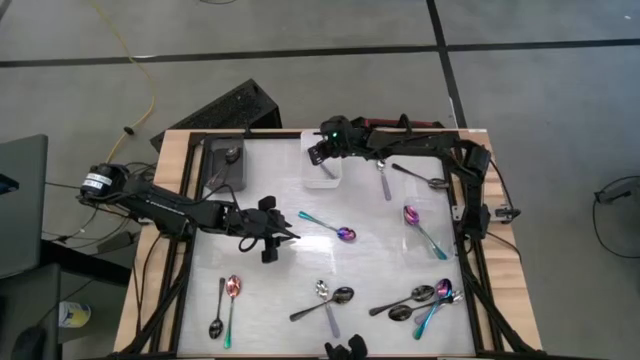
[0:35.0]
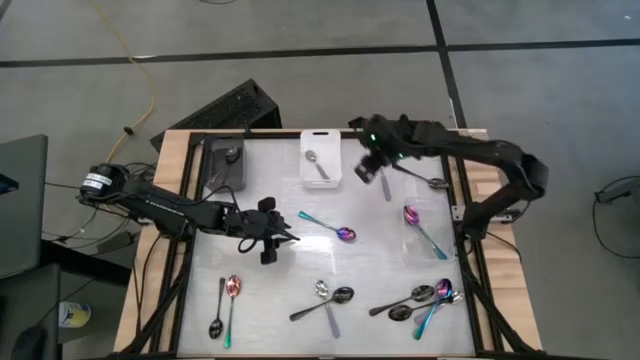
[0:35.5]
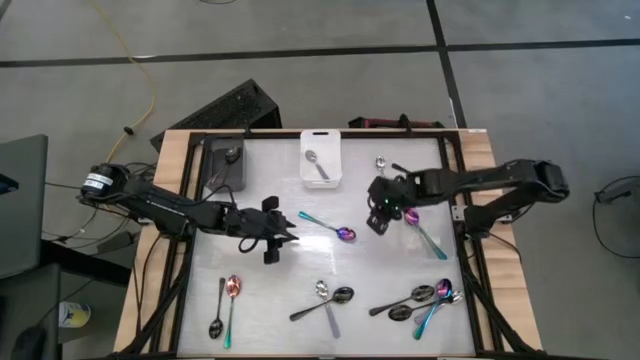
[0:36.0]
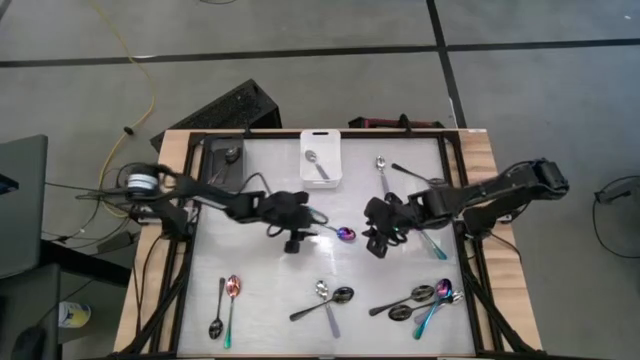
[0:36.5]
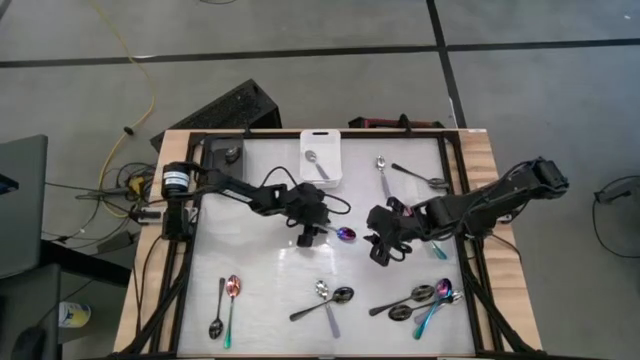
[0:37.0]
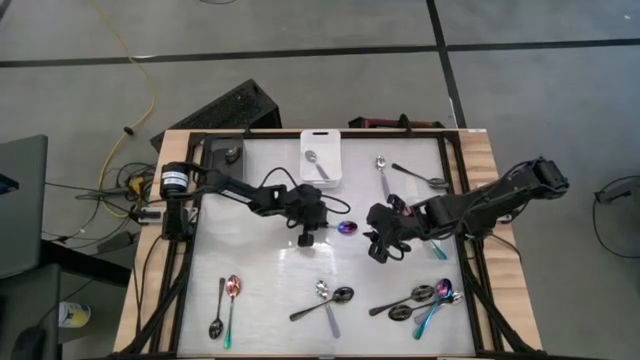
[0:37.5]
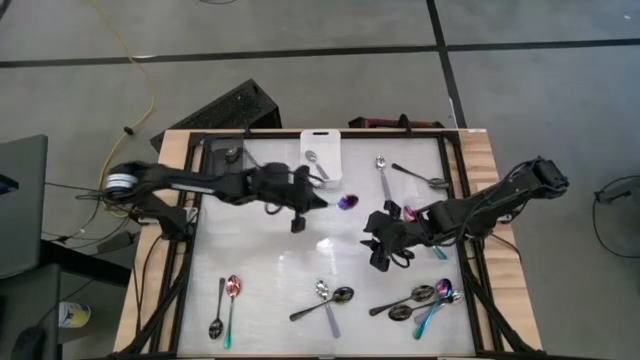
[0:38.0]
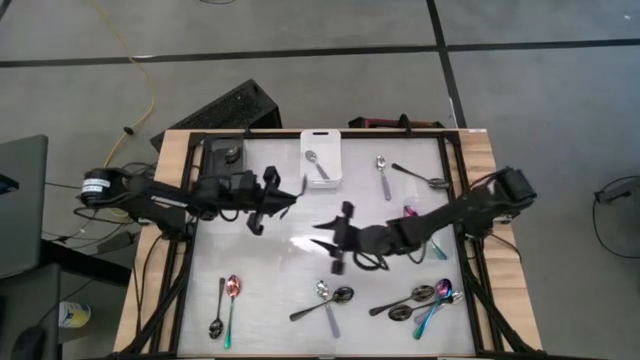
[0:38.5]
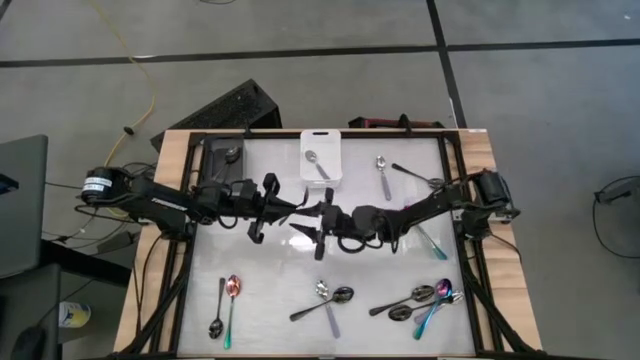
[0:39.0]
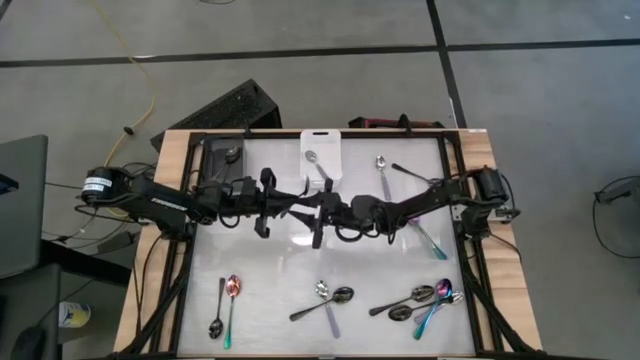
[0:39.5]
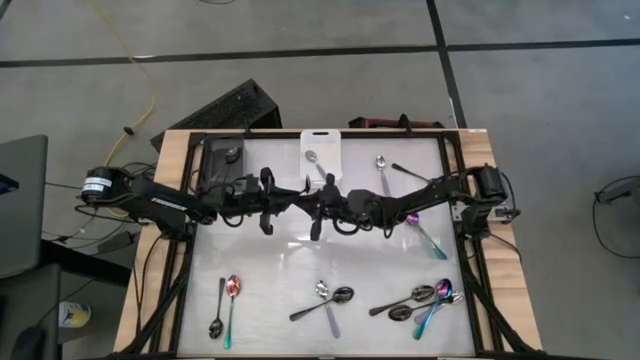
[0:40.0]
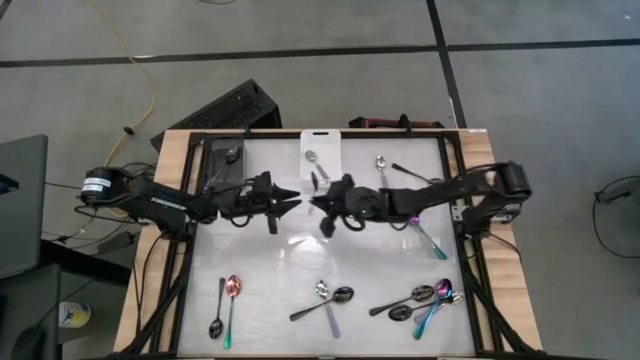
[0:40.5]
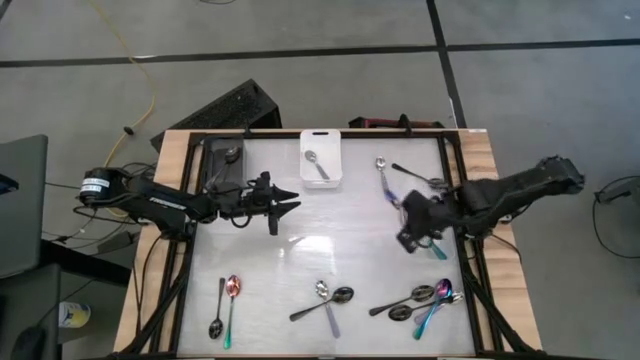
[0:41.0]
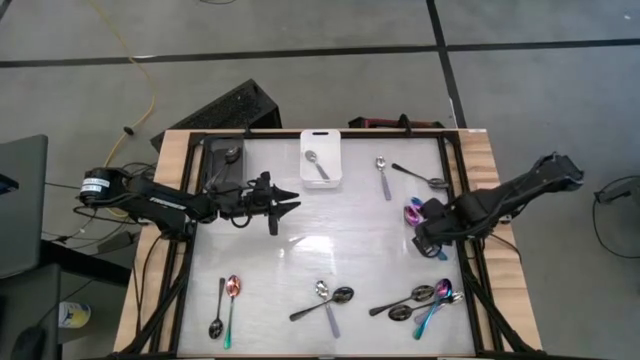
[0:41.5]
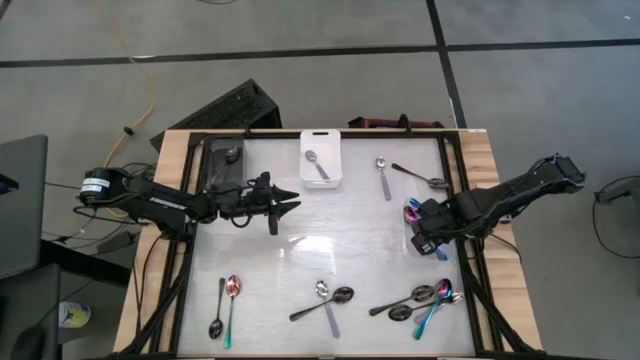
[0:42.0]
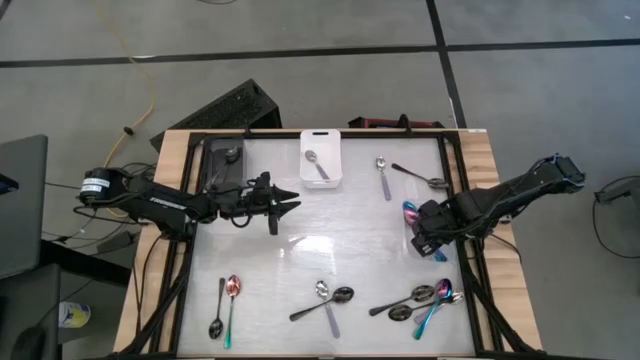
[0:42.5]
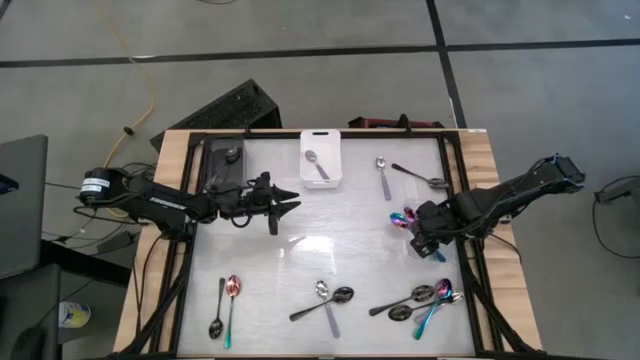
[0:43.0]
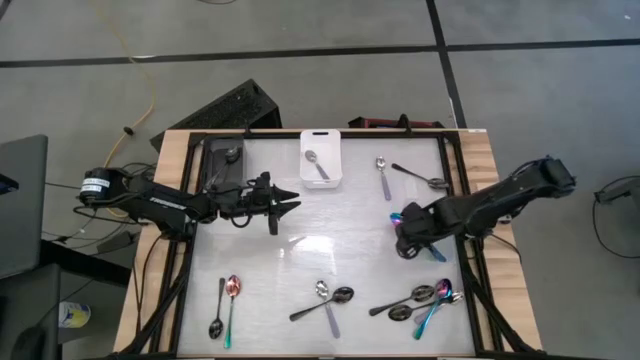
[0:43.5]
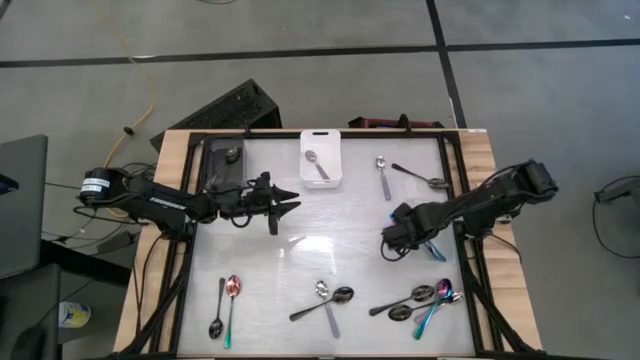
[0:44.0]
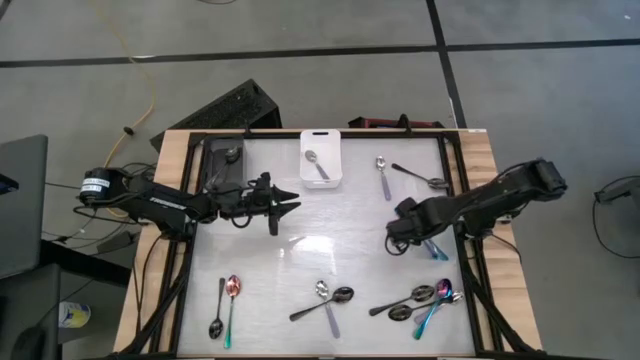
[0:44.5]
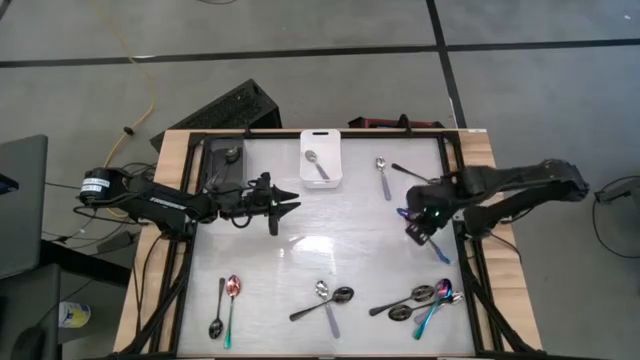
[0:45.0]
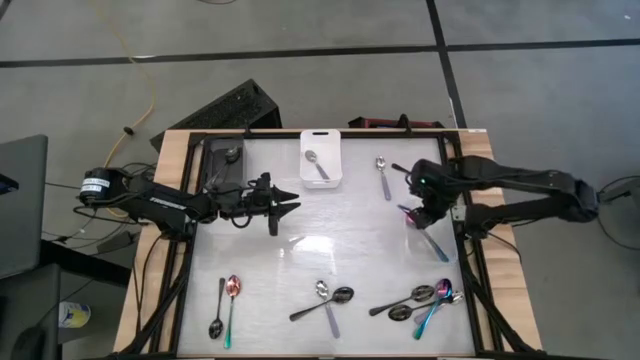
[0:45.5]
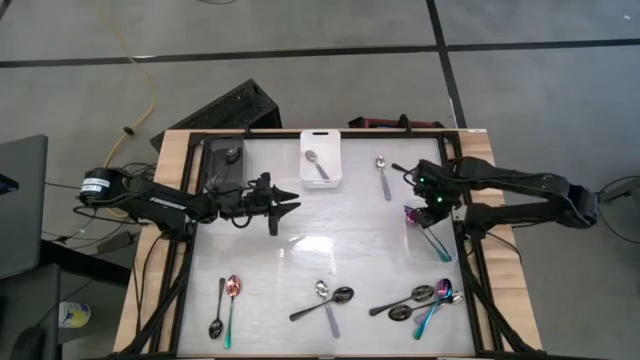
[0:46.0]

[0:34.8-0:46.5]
Task: Sort silverware by color (type)
Put the blue spoon into the transparent bin

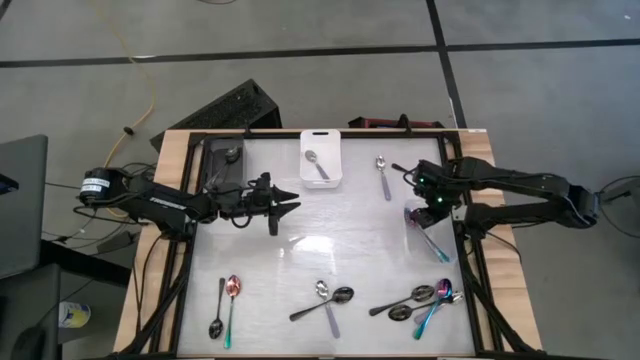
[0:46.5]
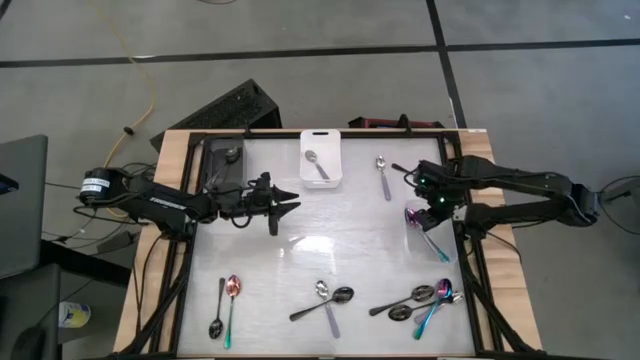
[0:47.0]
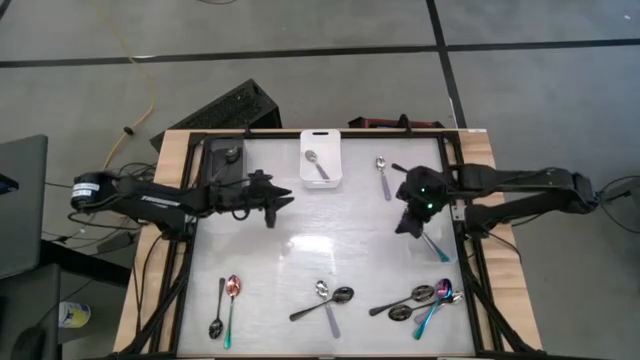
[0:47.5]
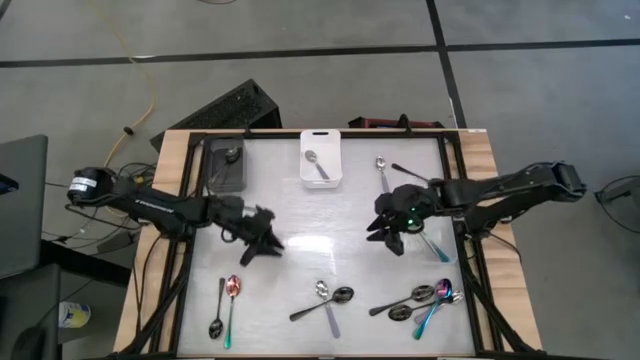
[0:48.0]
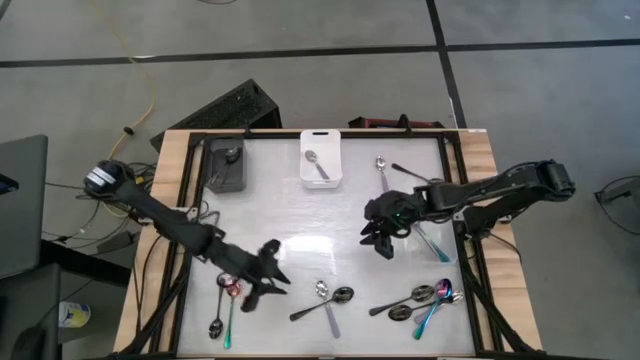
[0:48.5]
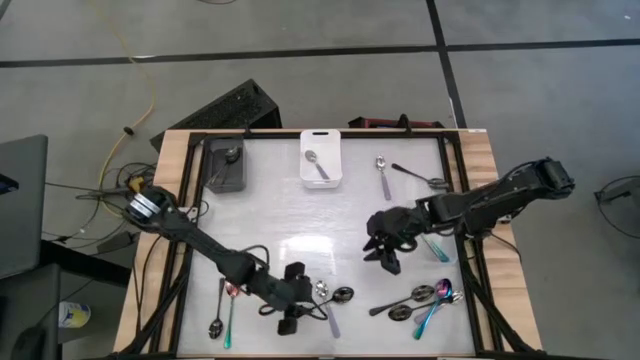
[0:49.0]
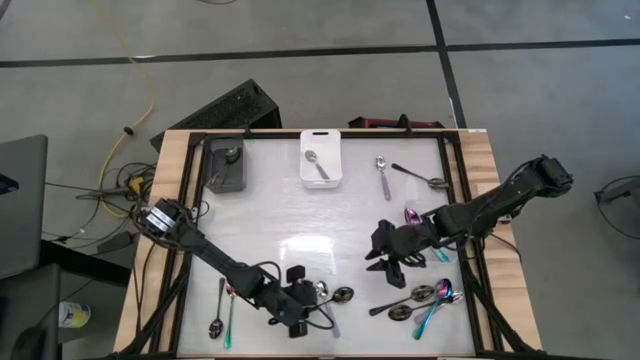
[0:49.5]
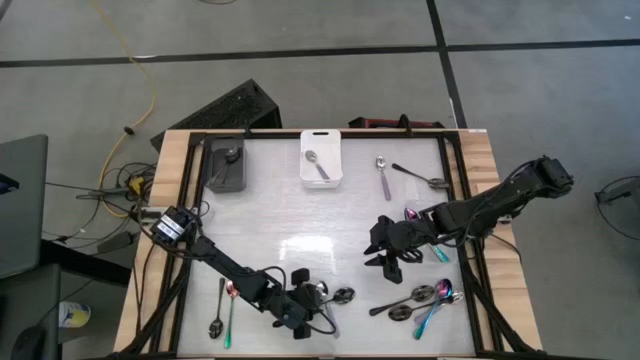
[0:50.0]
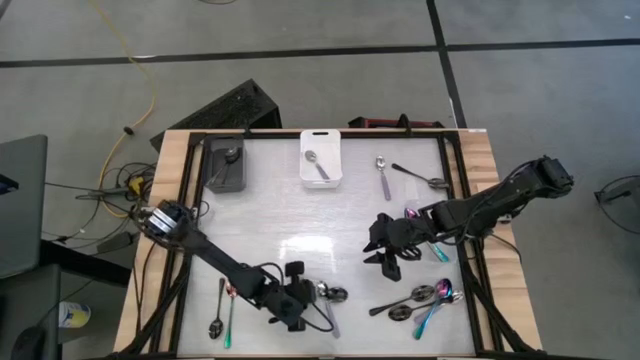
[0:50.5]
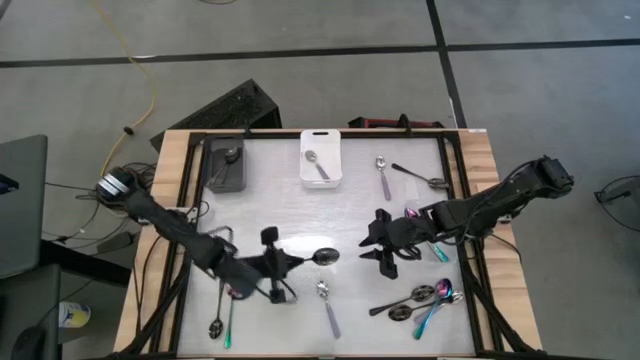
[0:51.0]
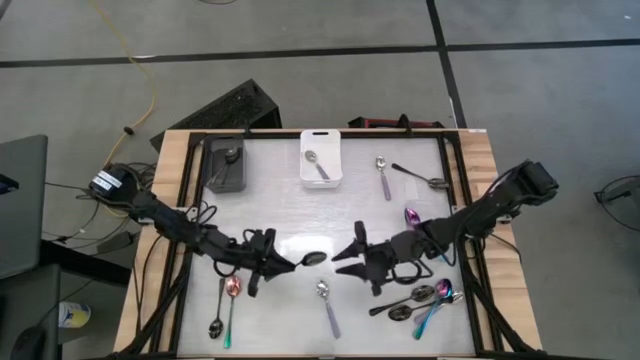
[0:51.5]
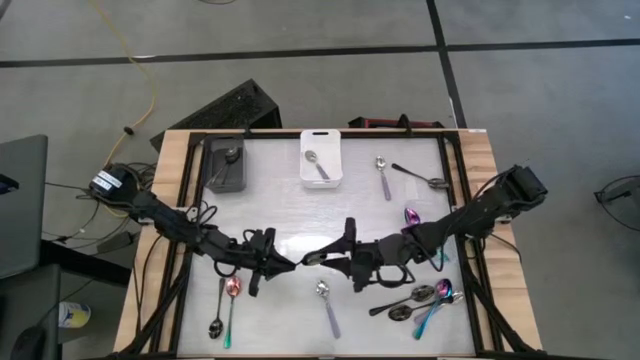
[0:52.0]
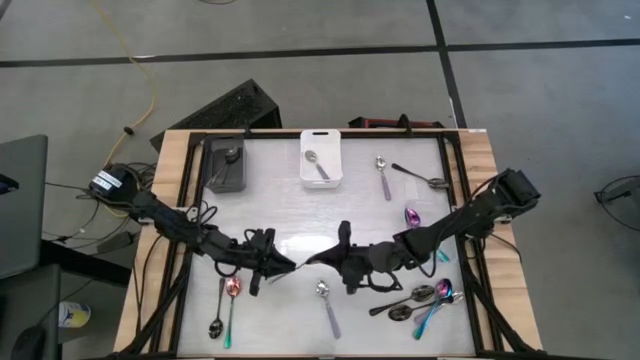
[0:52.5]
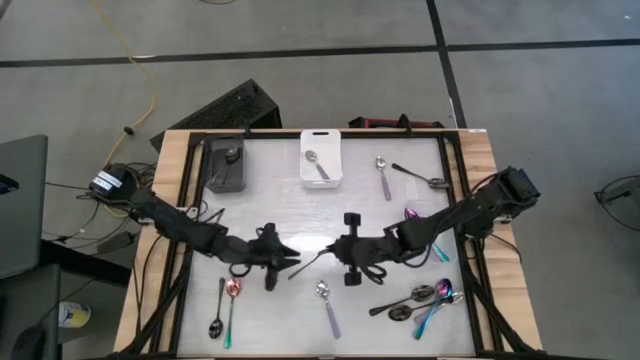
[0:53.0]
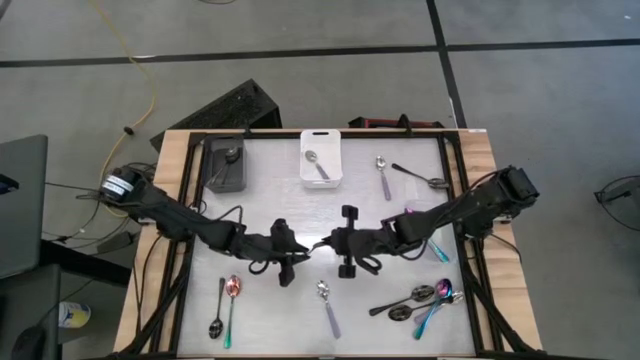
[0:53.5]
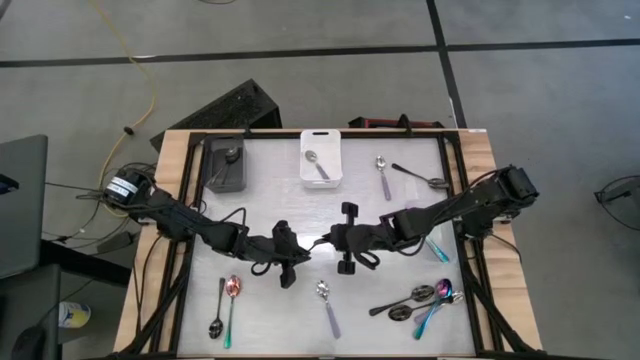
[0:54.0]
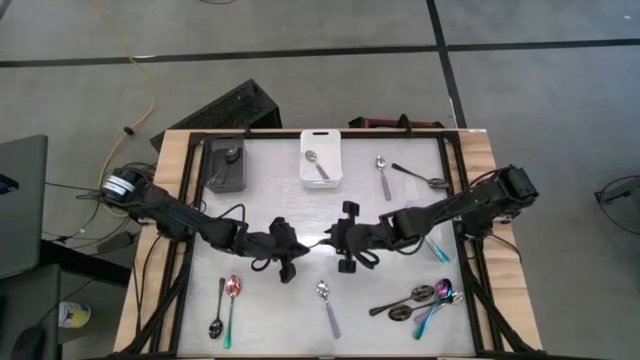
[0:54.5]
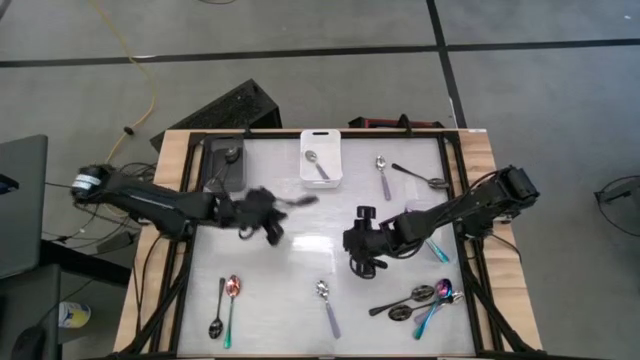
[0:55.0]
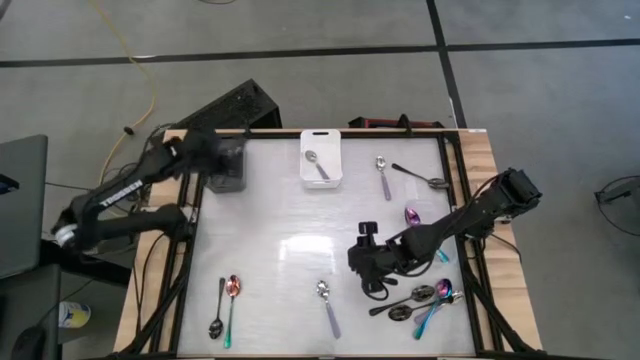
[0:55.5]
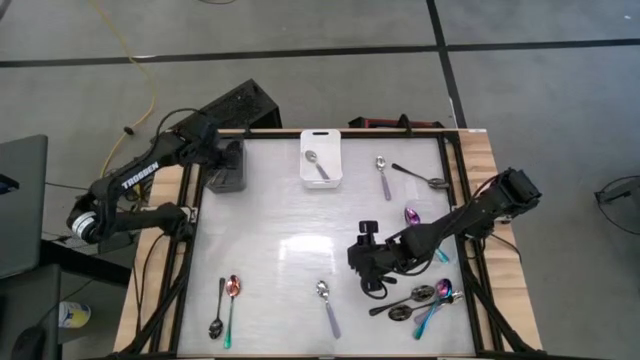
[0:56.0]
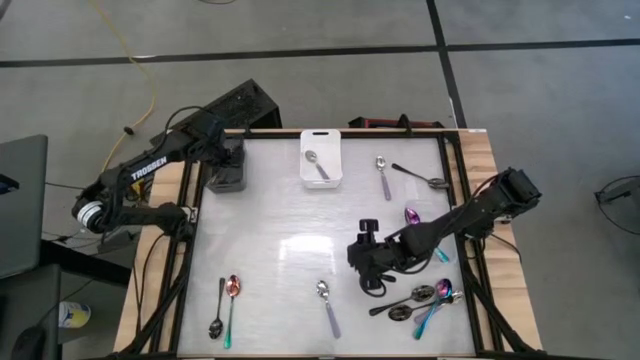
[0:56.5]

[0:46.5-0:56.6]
Put the black spoon into the black bin
